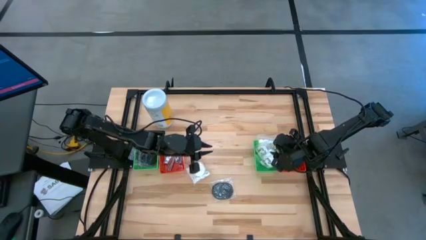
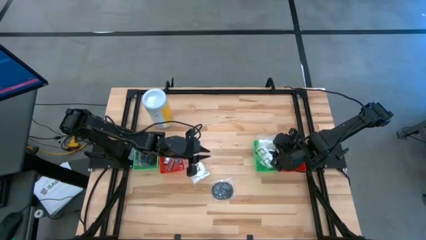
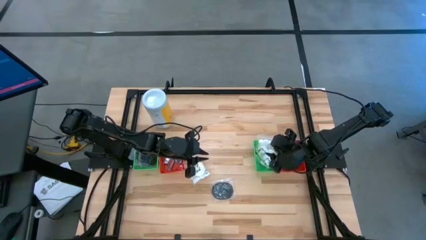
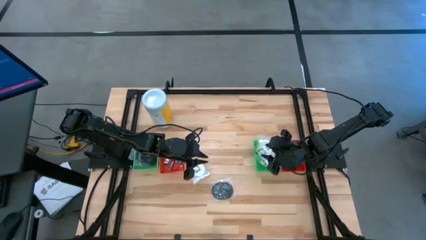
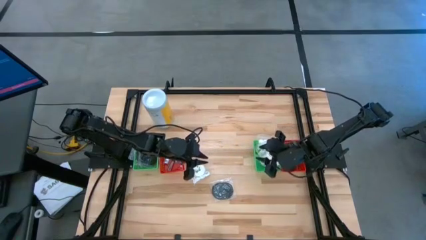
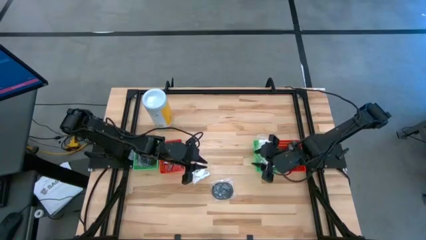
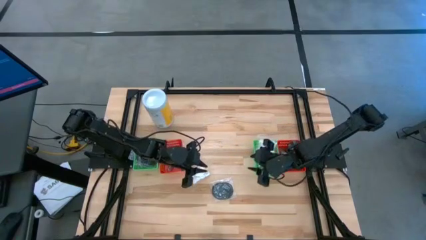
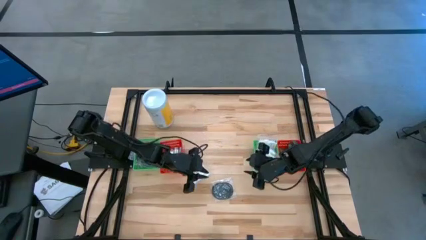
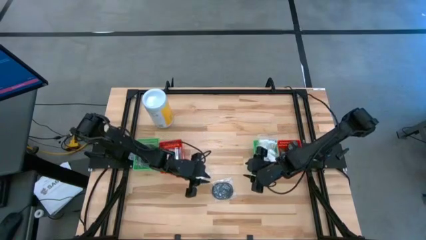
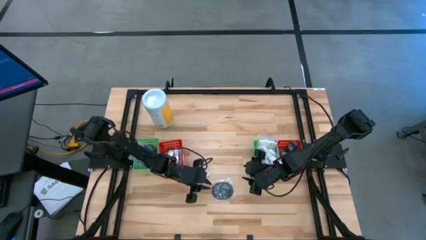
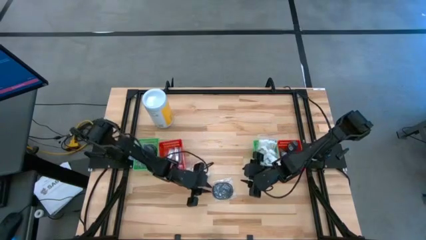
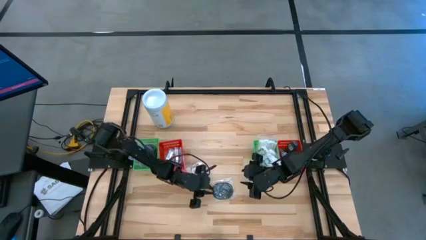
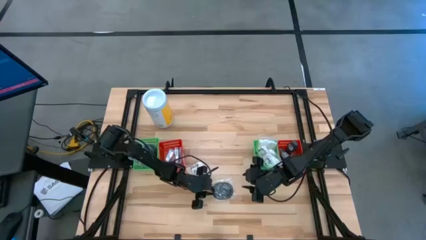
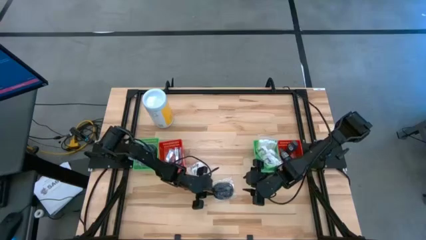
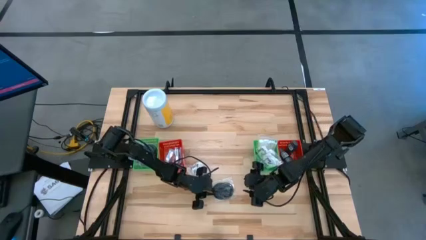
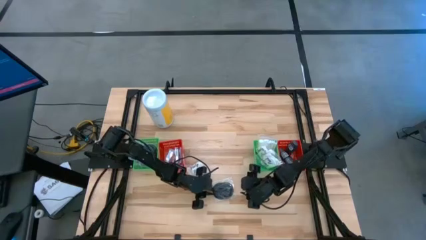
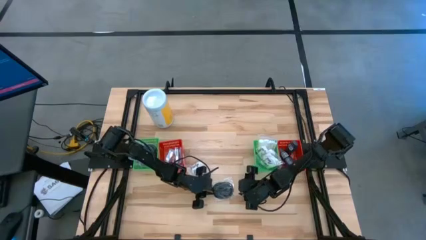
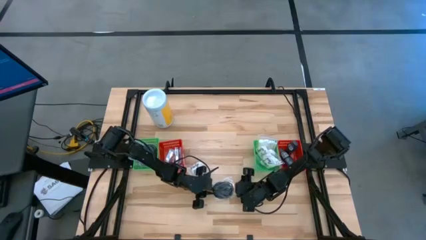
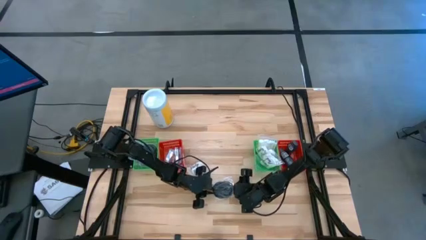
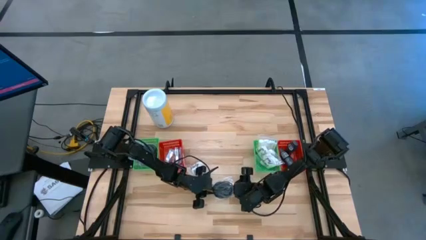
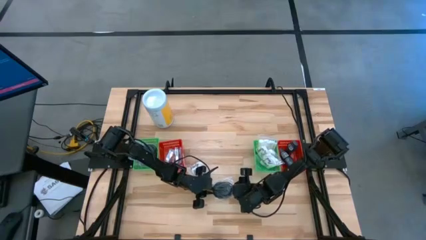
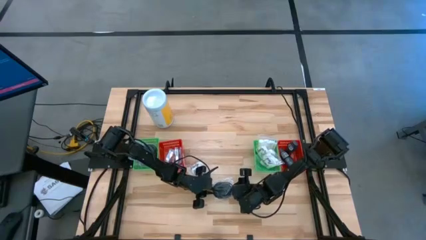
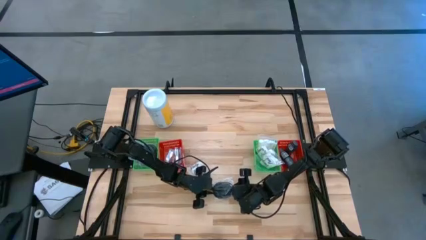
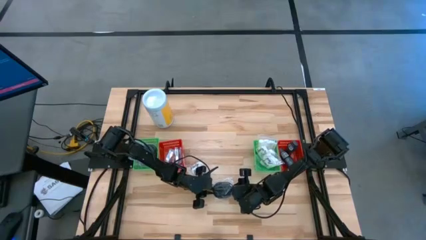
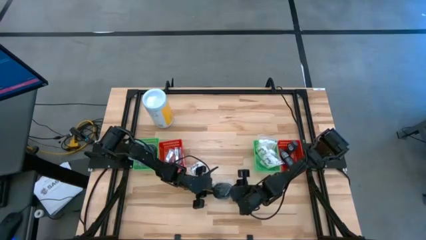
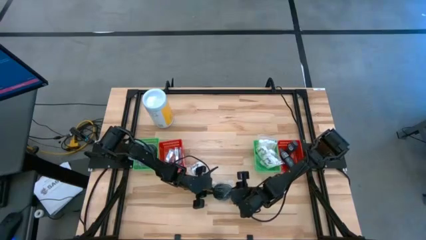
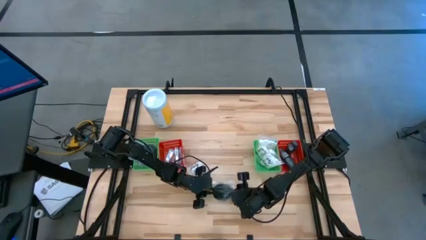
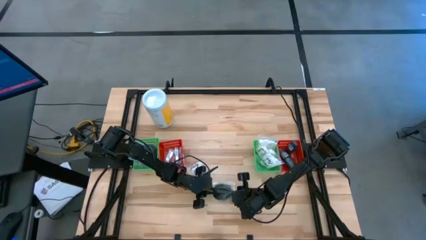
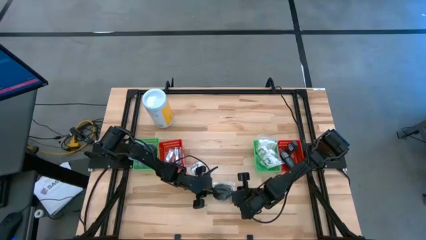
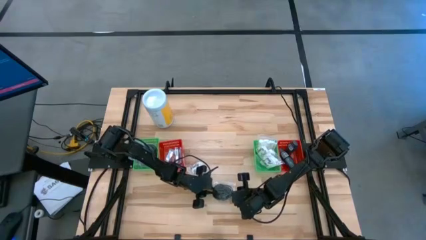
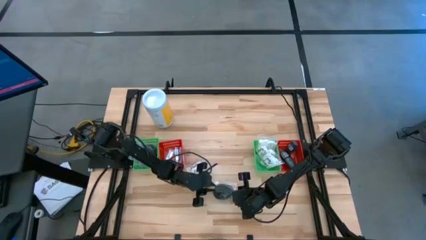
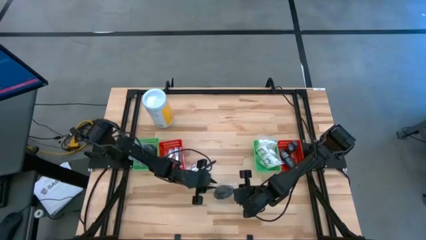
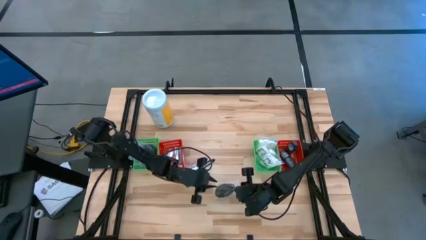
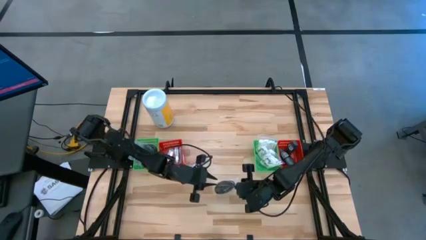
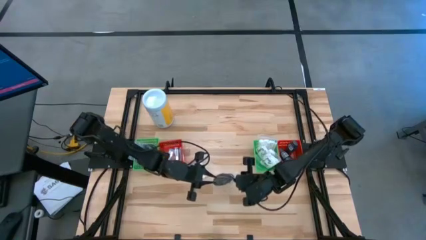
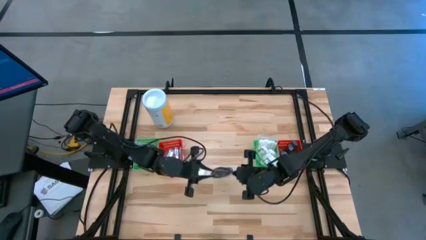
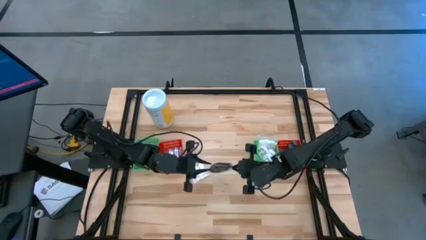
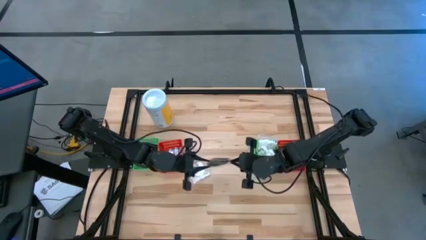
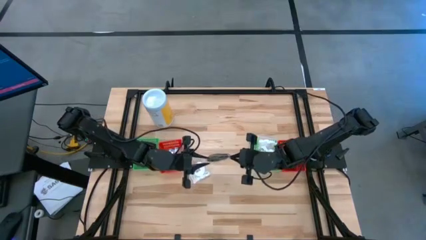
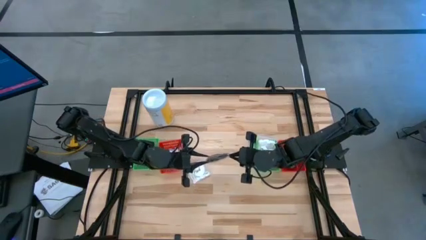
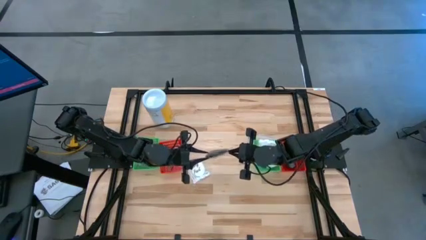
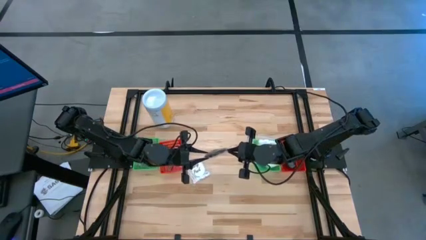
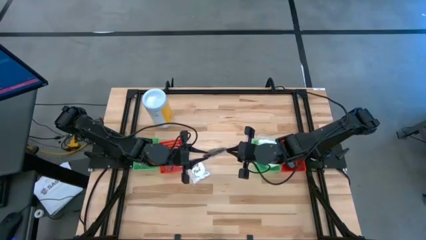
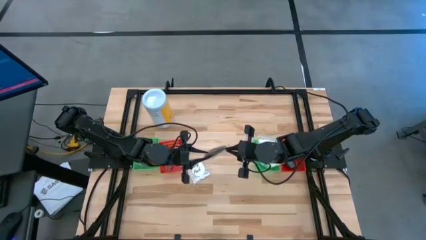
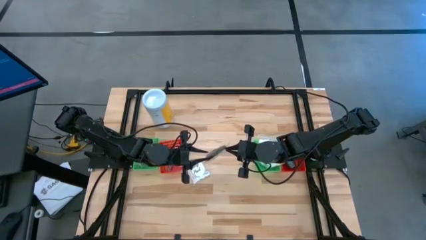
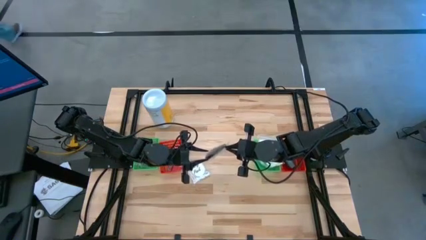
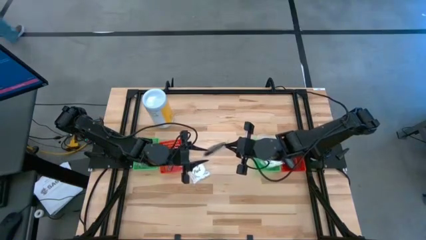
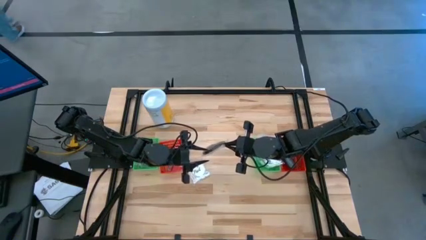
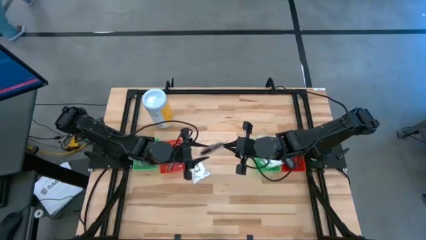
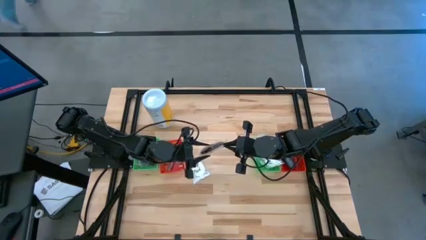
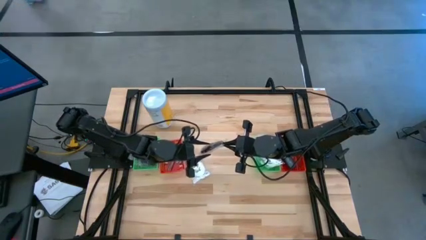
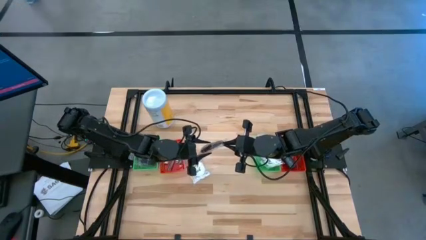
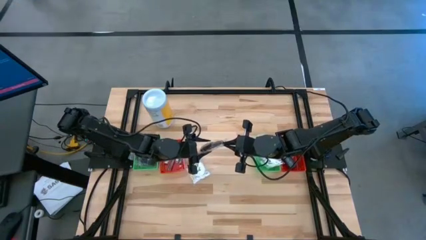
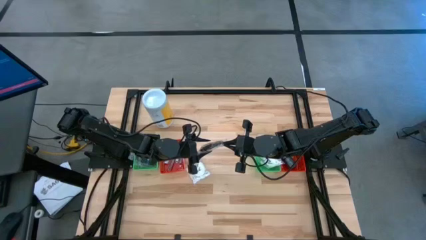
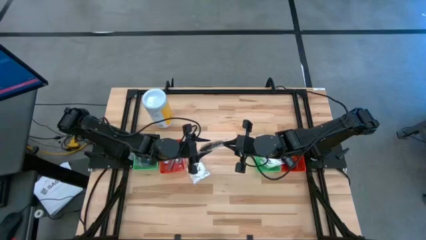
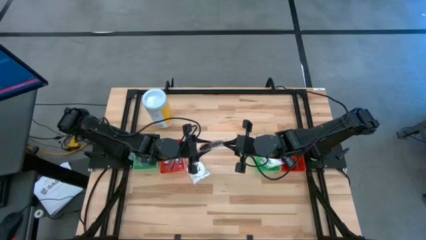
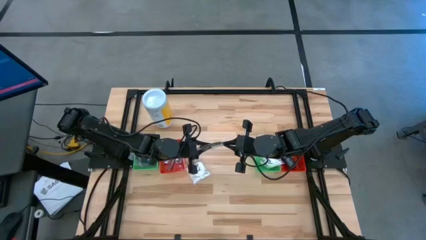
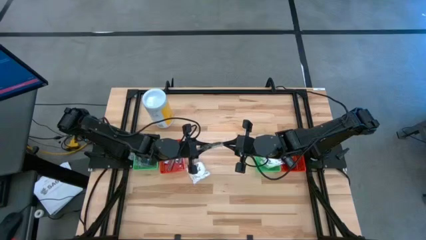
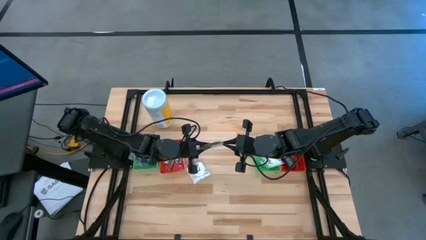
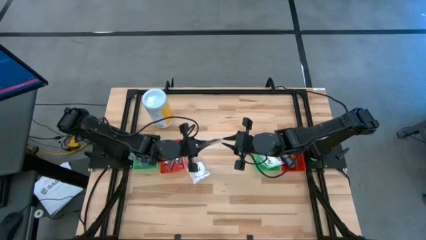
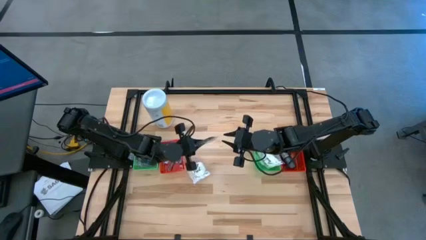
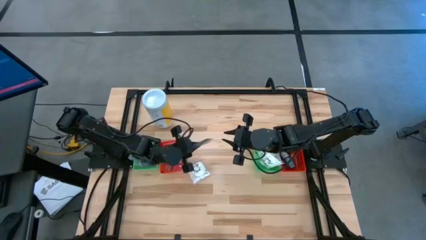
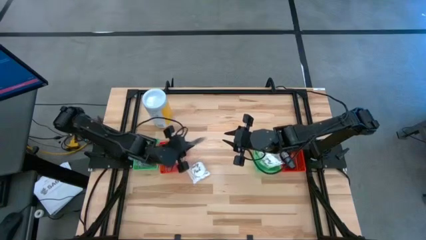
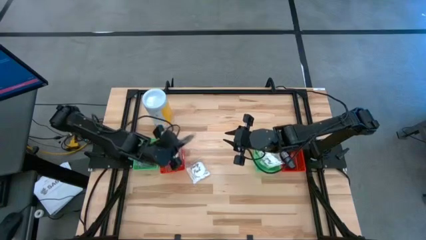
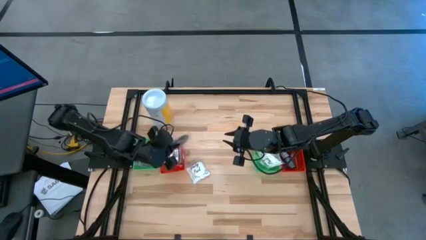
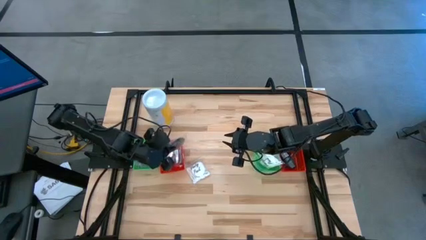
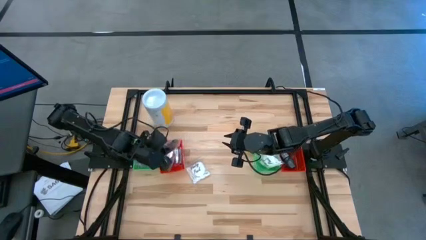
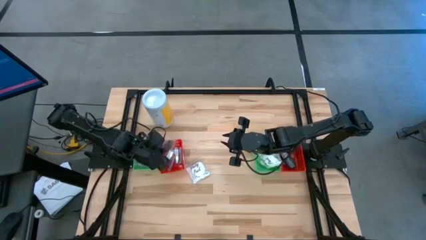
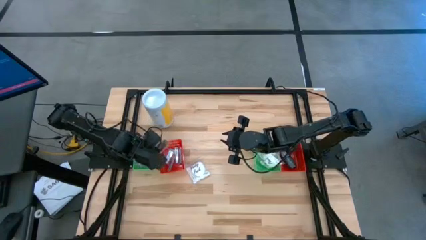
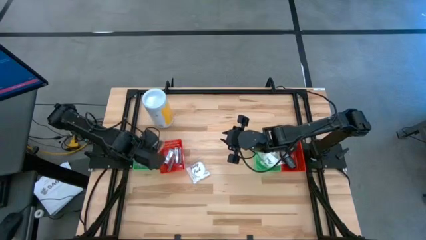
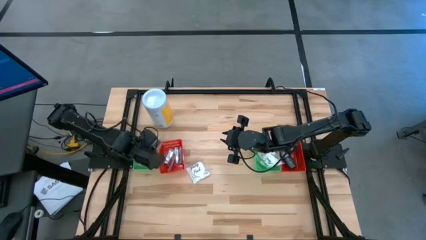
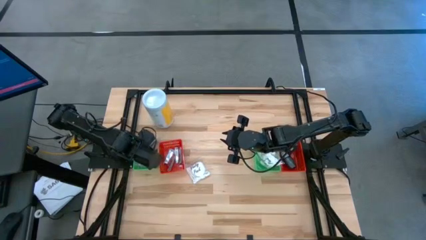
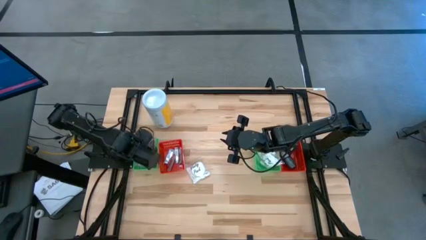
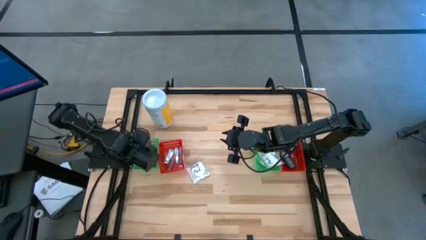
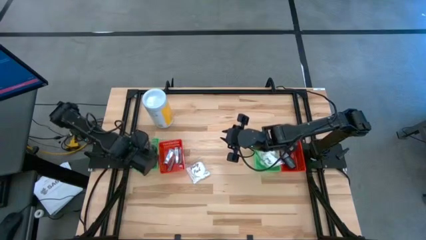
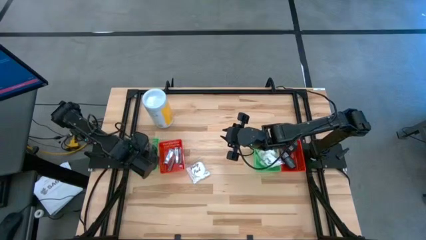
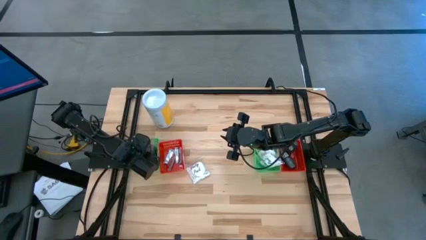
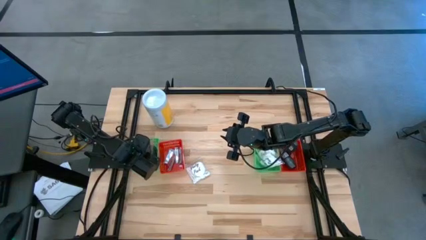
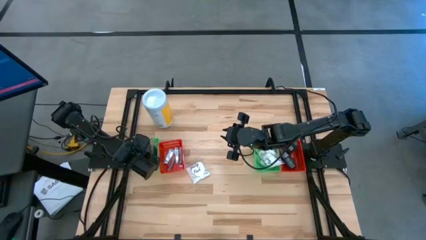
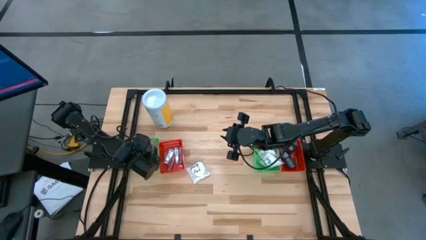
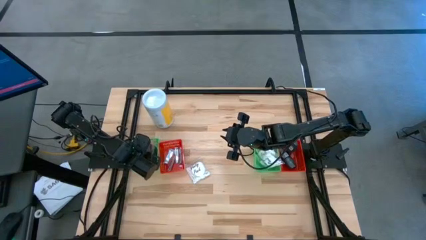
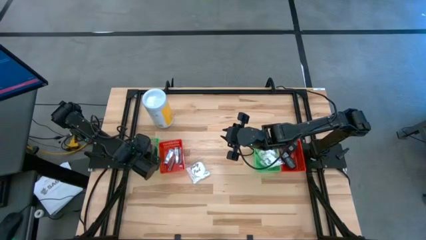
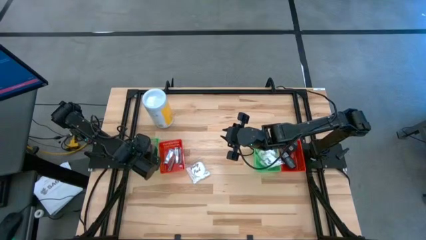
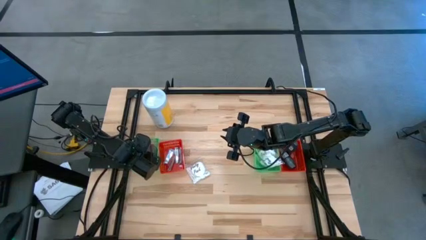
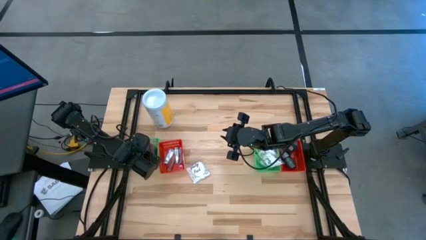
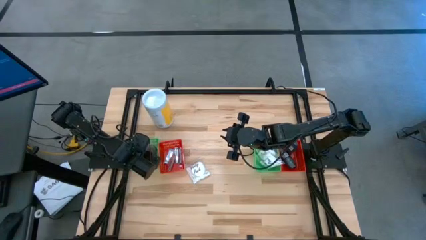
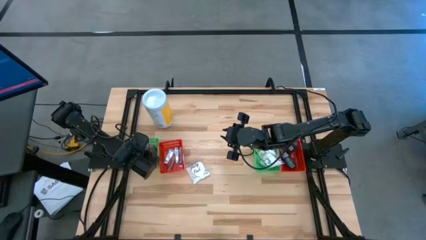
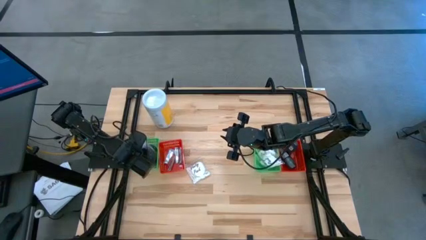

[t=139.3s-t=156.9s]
Task: Pick & Place Travel size toiletries
Put the black hair brush into the left green bin
